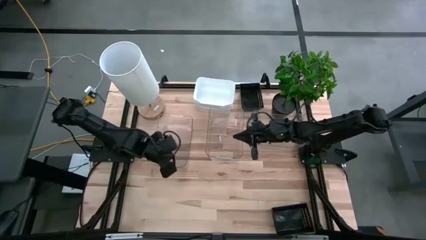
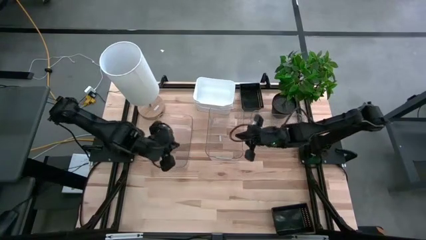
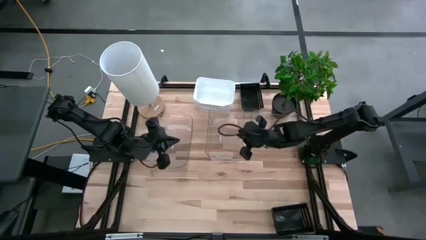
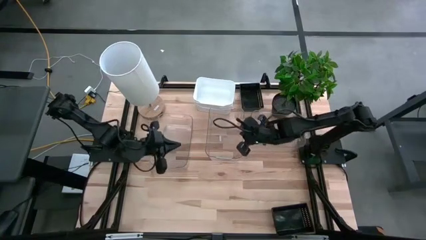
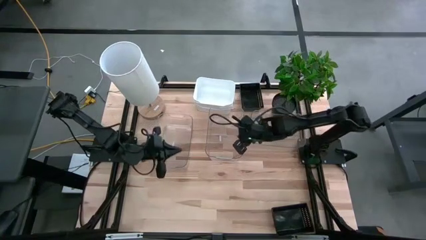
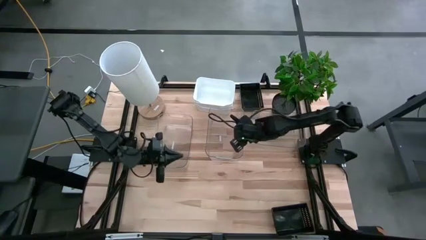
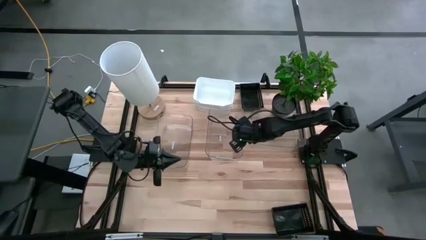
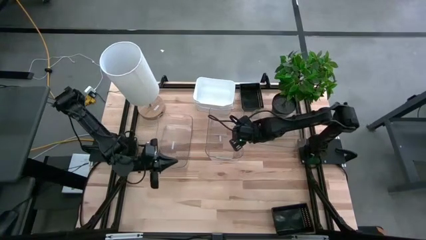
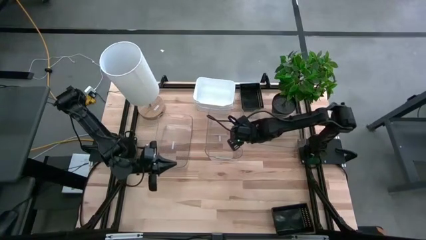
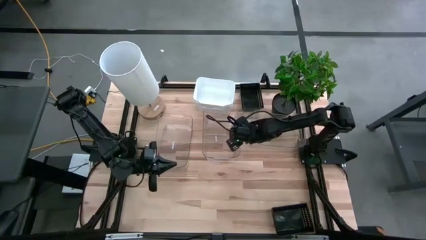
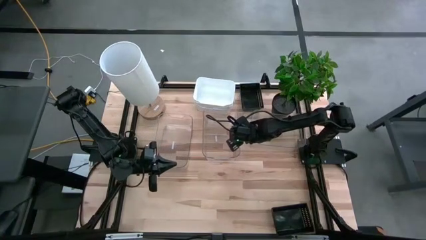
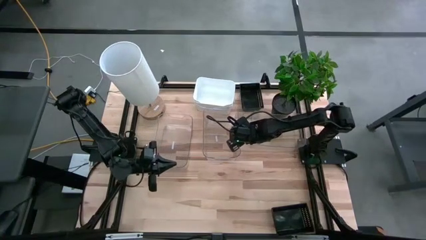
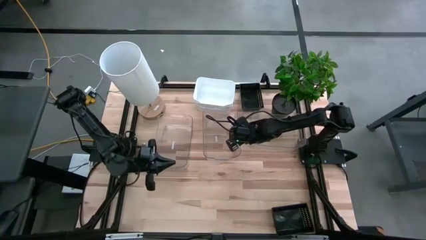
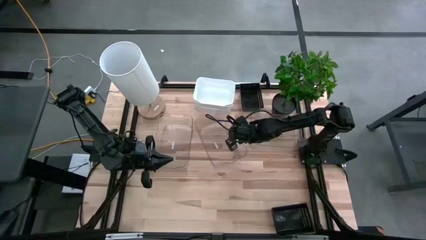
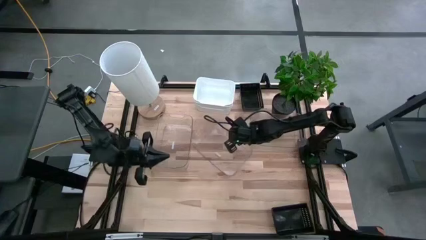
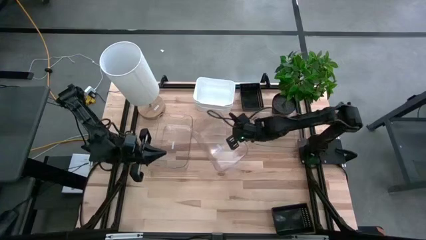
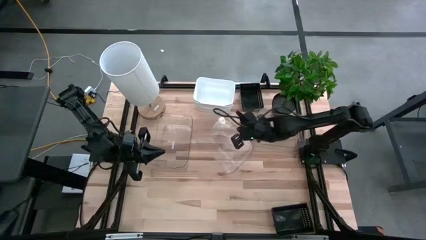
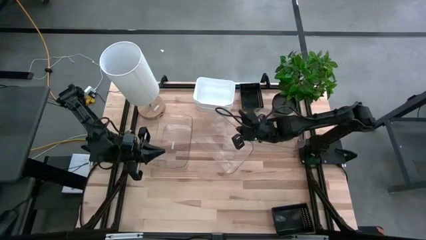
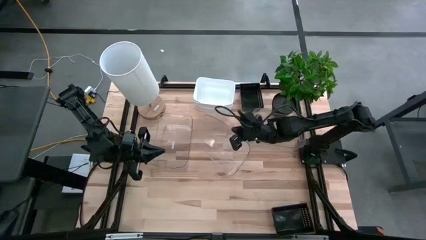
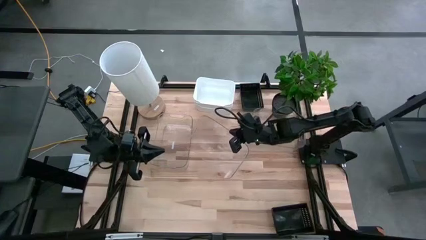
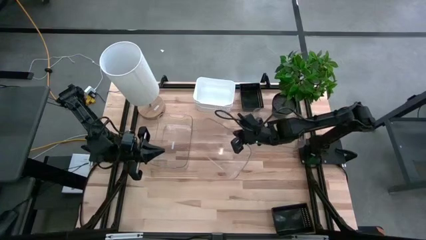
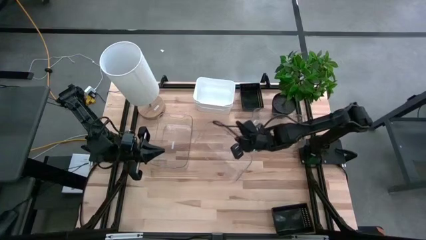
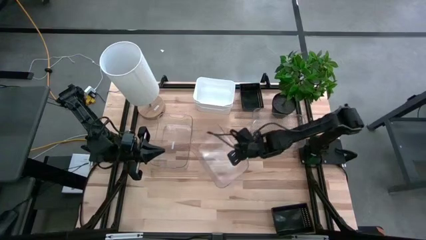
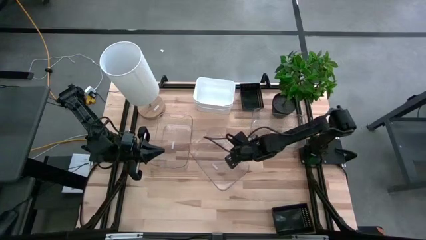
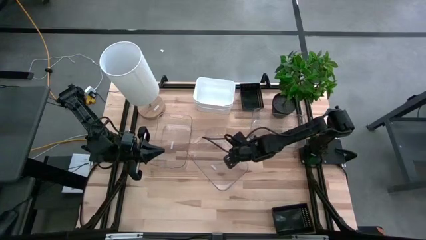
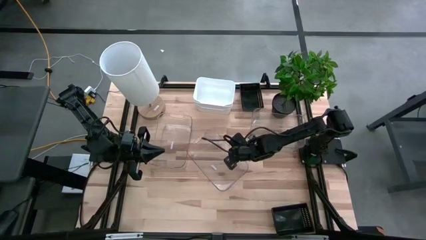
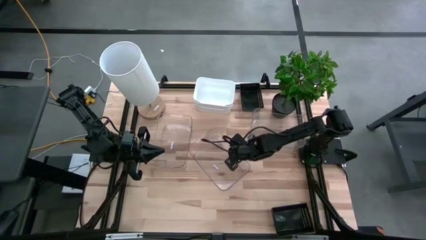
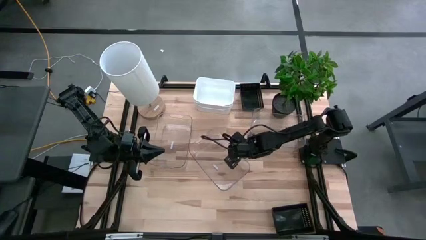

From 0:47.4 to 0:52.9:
Stack the middle transparent bin on top of the left transparent bin

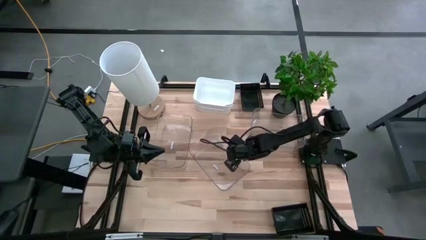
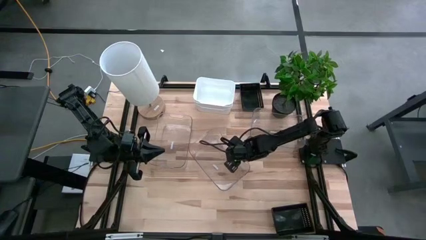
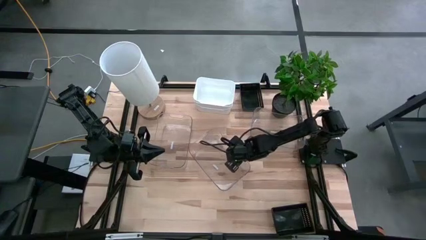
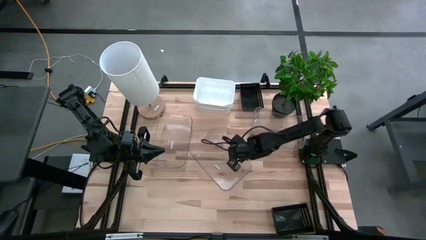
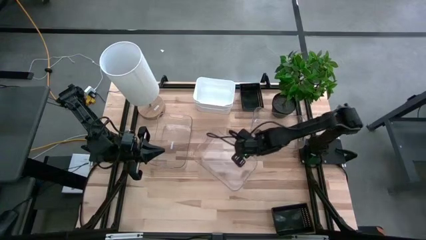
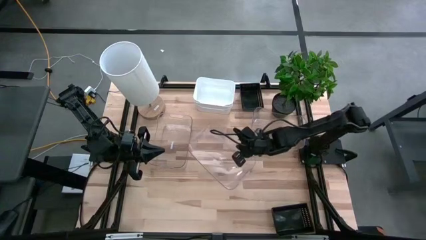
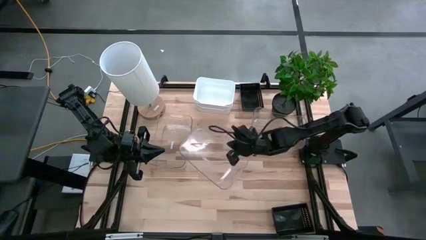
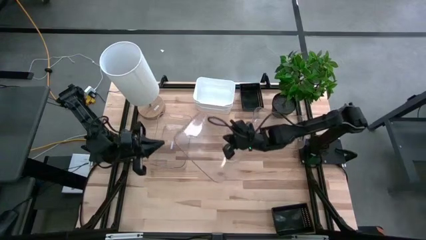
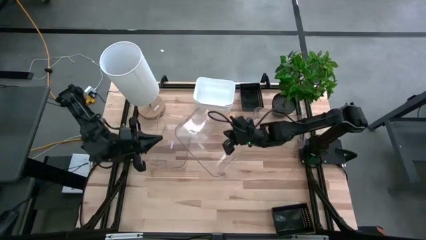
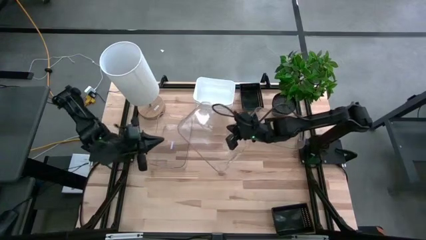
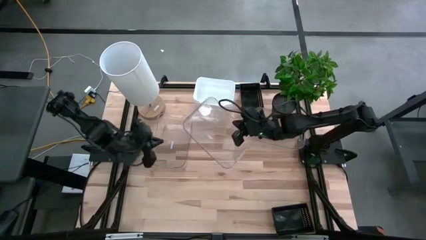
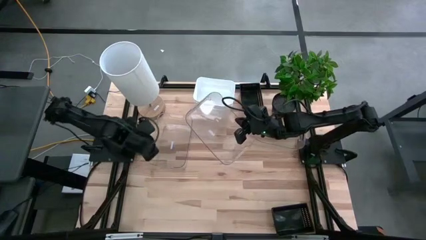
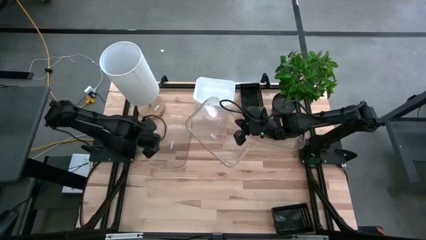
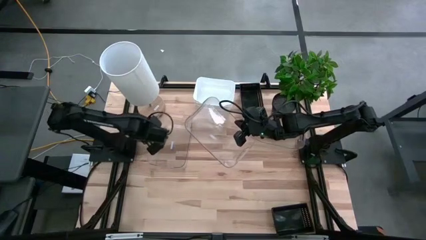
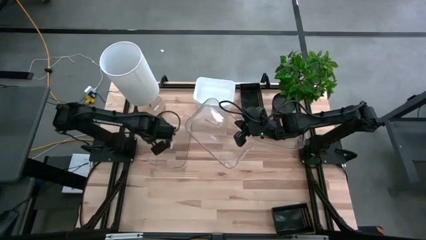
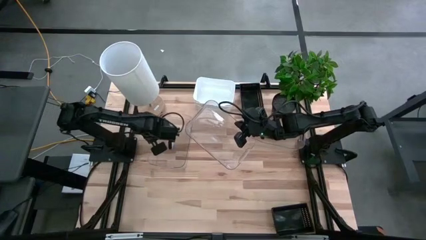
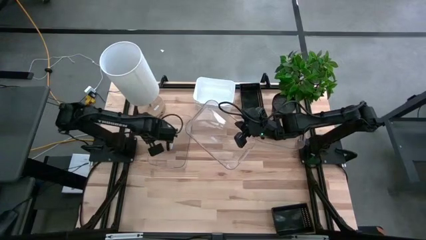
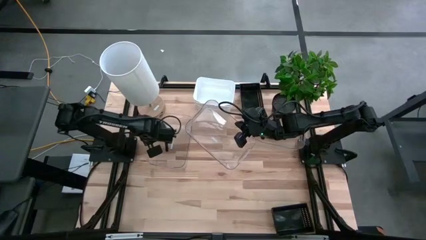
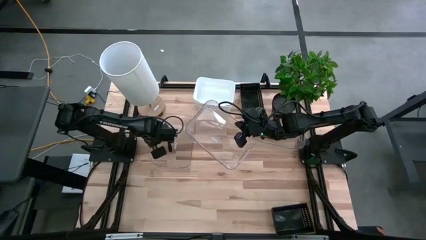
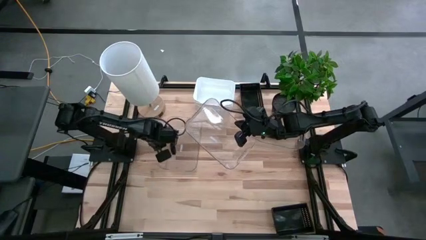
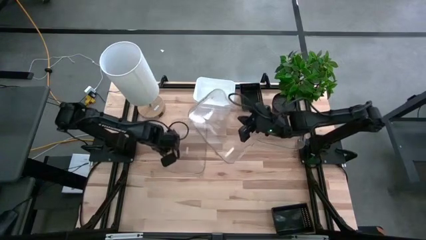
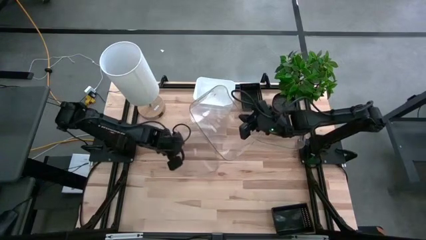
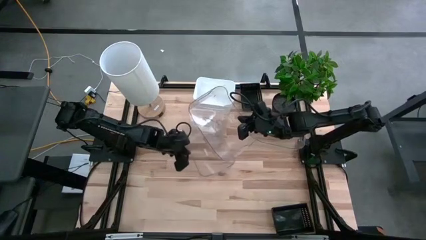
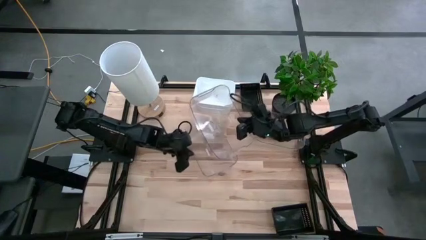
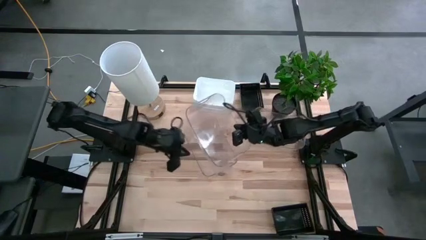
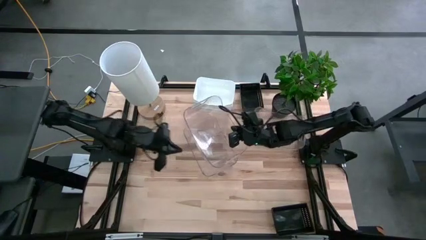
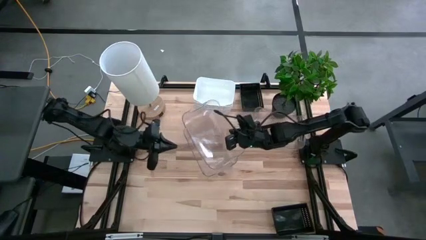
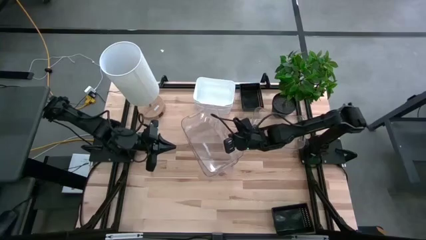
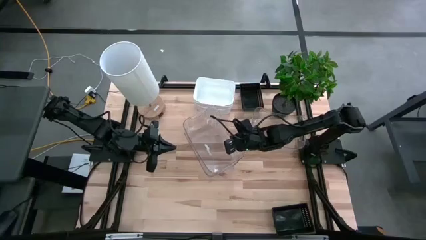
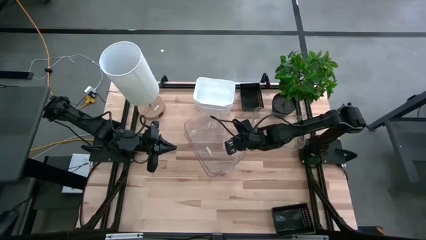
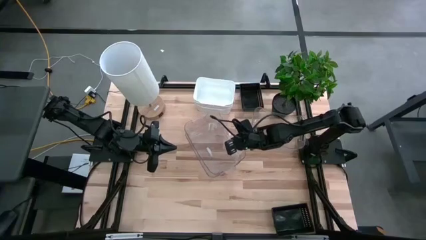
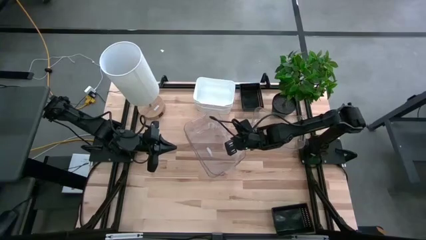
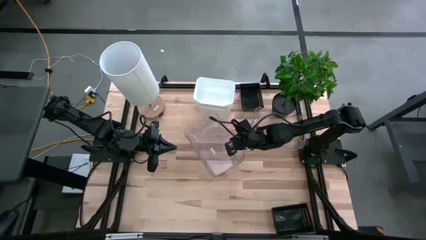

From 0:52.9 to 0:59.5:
Stack the middle transparent bin on top of the left transparent bin

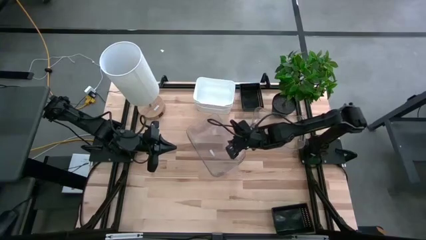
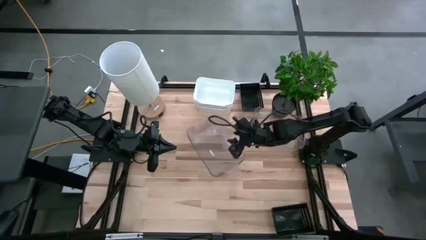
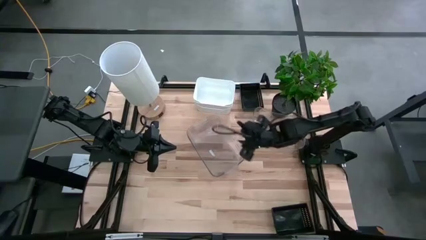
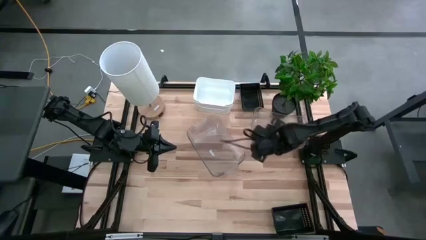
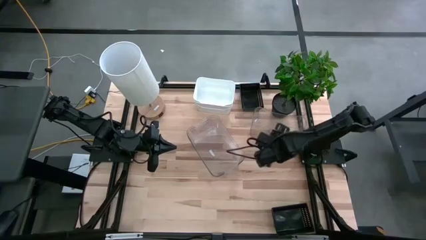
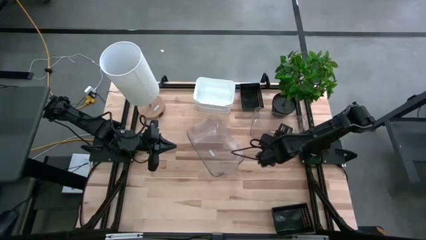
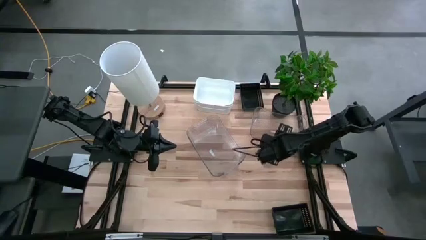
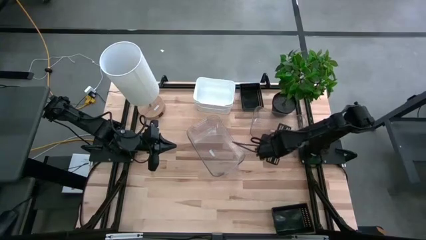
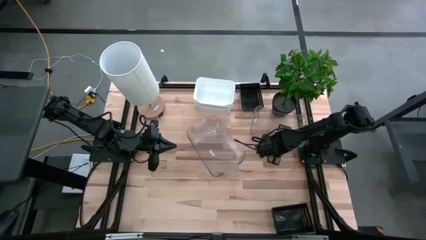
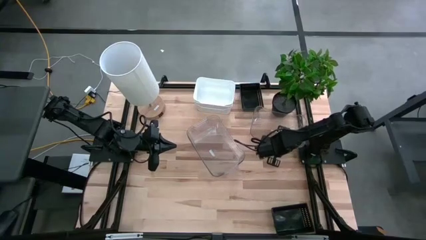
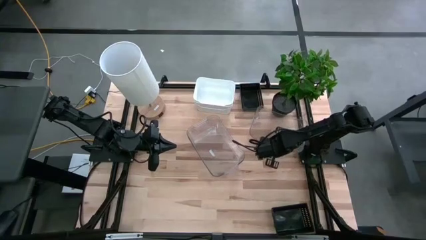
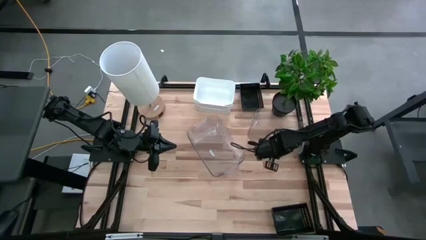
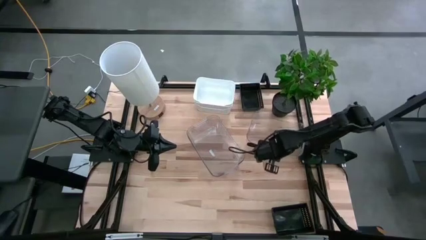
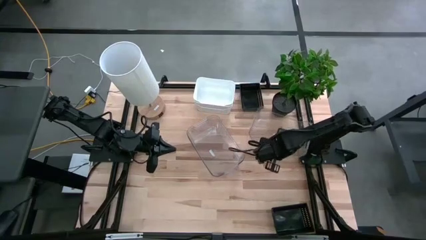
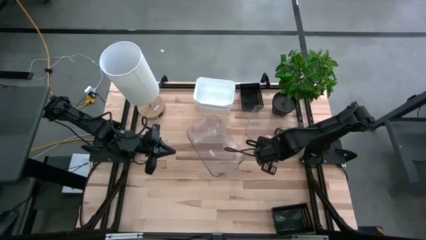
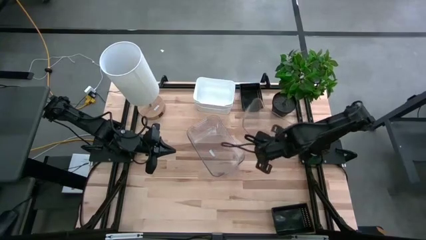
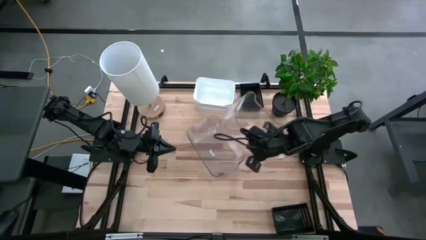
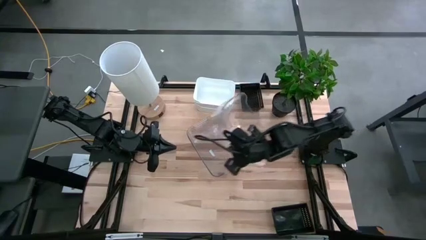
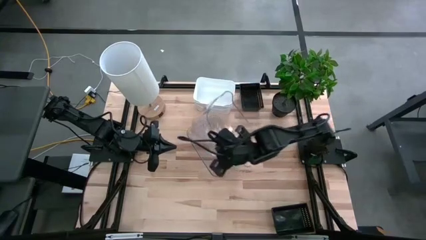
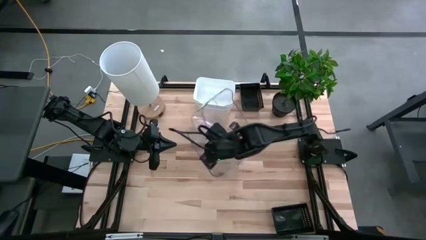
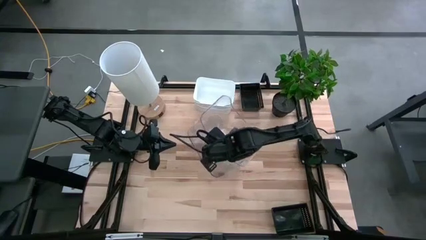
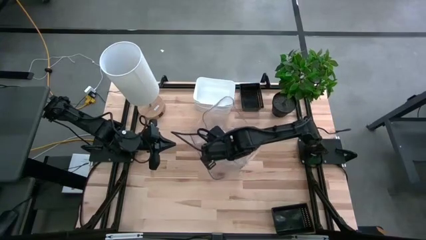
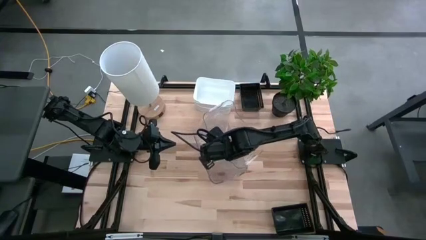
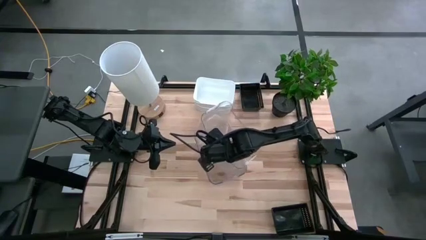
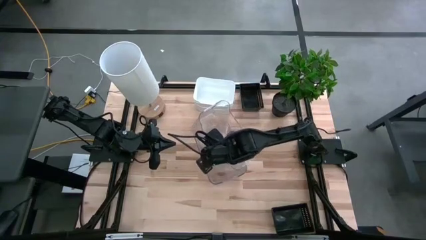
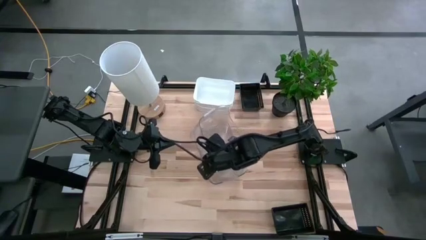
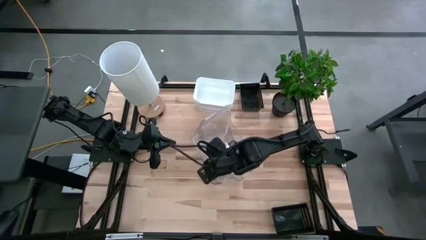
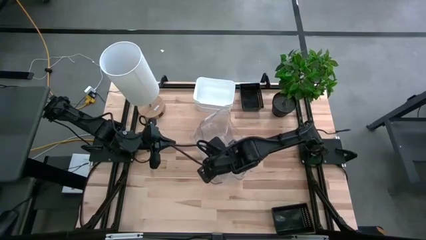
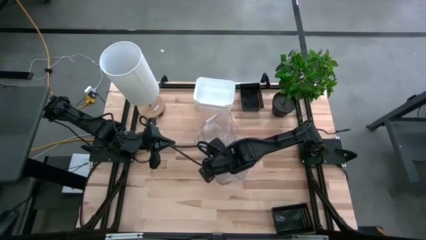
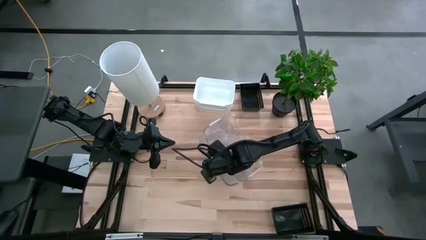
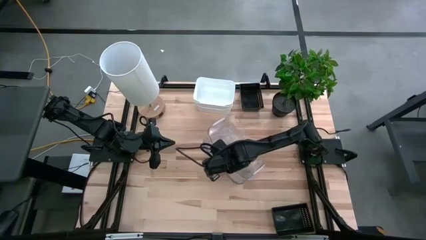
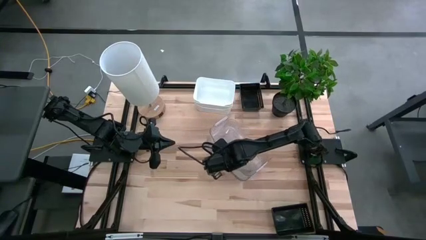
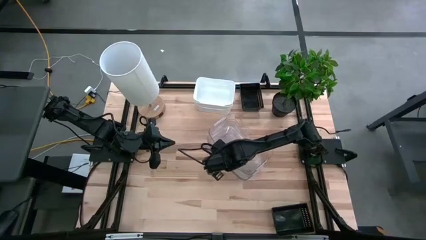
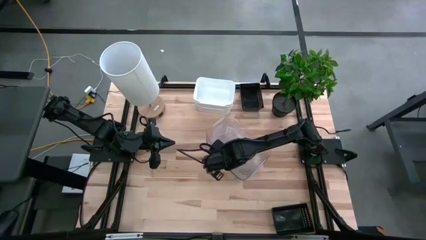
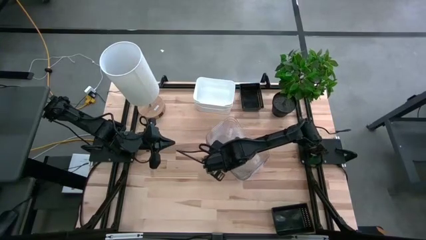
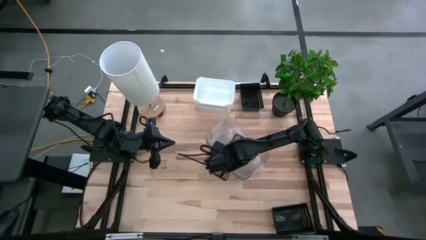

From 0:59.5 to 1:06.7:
Stack the right transparent bin on top of the left transparent bins
